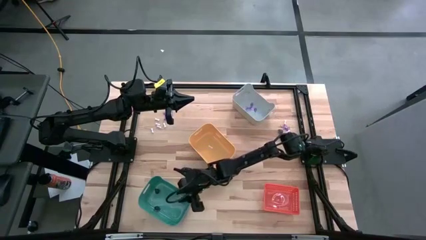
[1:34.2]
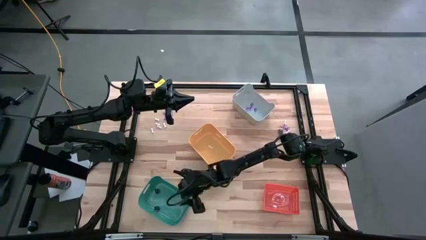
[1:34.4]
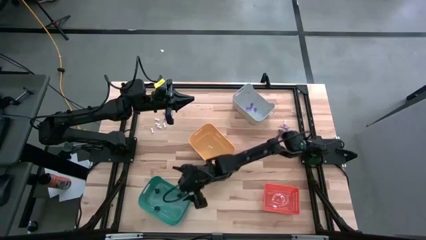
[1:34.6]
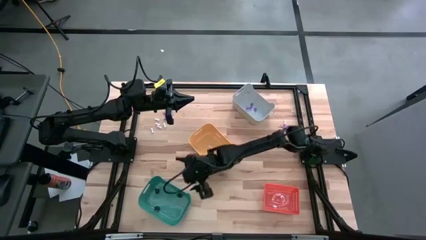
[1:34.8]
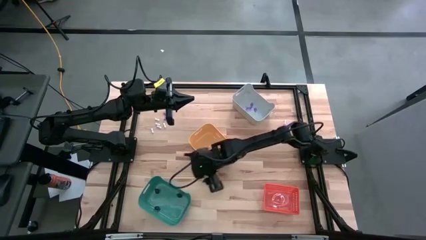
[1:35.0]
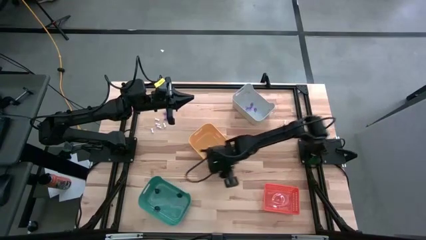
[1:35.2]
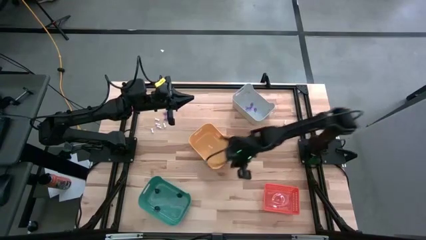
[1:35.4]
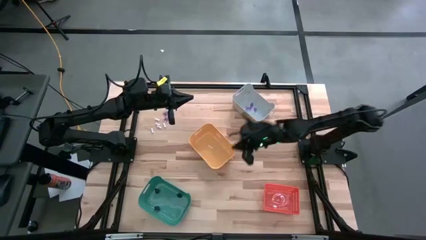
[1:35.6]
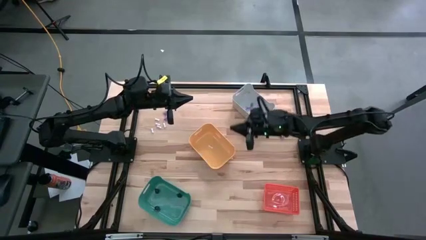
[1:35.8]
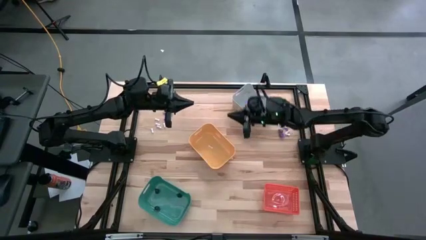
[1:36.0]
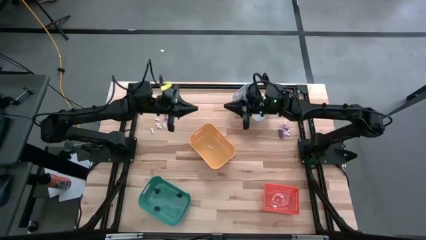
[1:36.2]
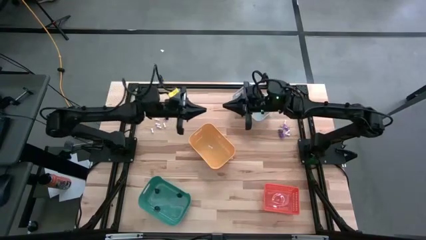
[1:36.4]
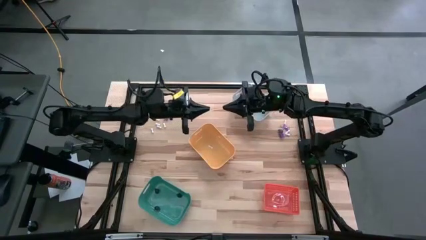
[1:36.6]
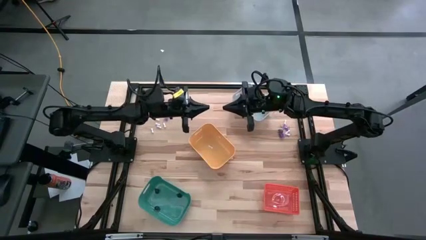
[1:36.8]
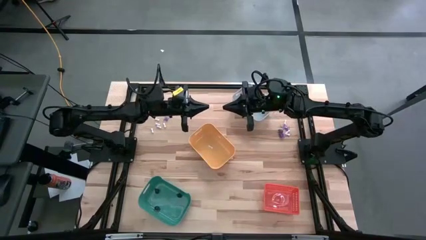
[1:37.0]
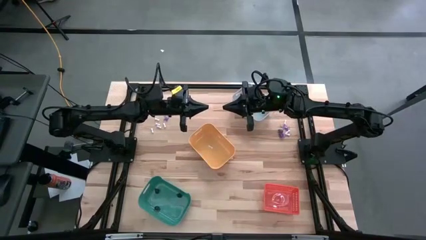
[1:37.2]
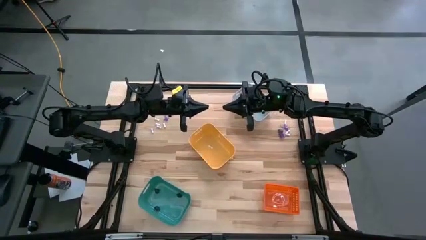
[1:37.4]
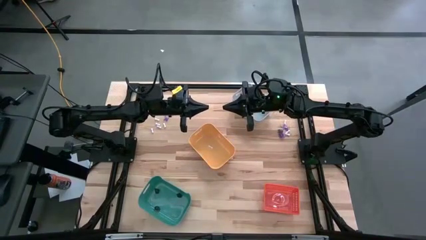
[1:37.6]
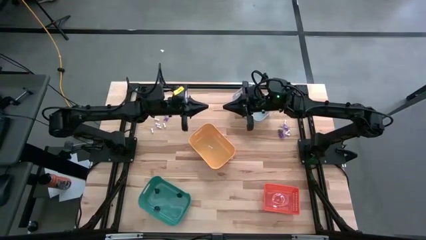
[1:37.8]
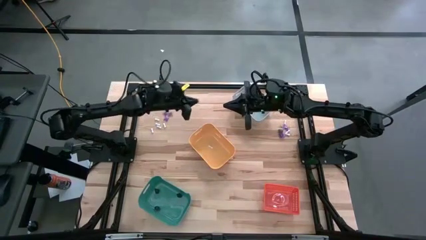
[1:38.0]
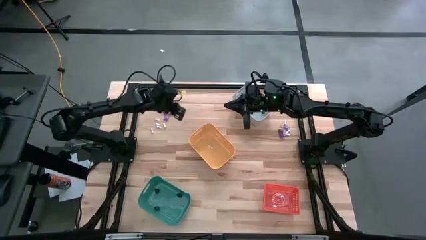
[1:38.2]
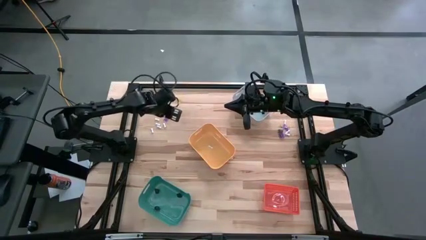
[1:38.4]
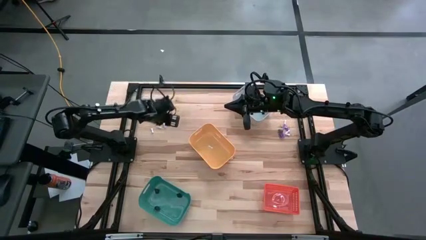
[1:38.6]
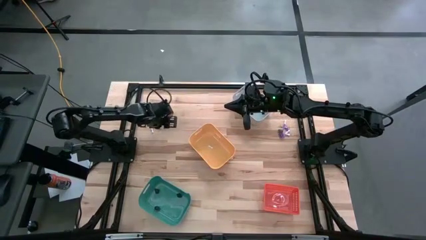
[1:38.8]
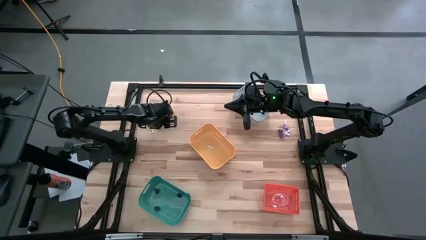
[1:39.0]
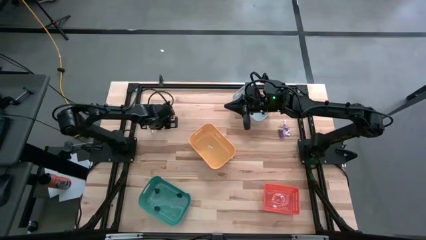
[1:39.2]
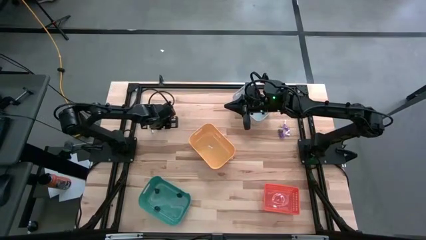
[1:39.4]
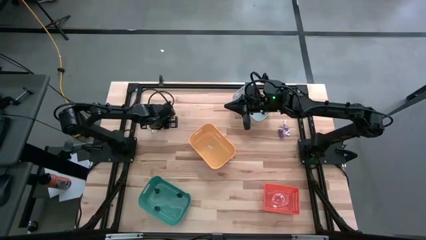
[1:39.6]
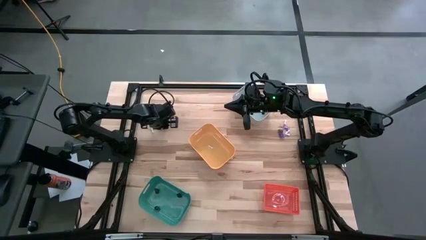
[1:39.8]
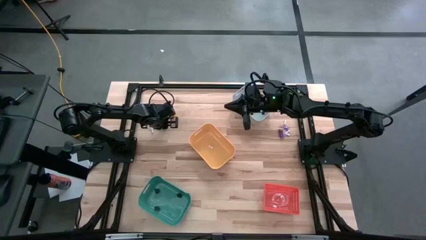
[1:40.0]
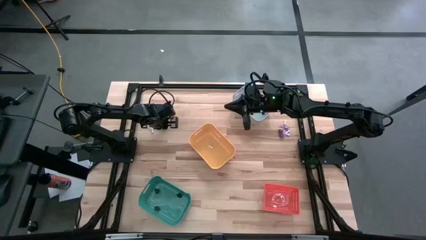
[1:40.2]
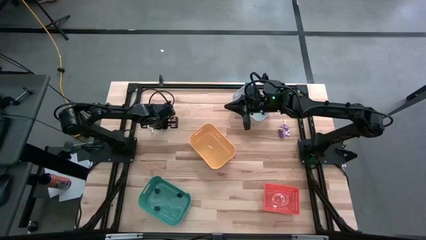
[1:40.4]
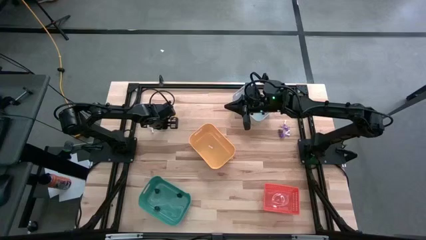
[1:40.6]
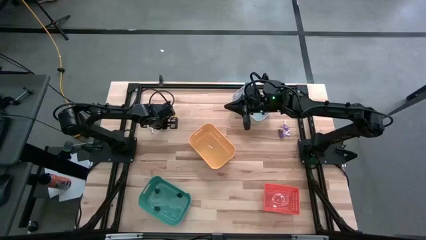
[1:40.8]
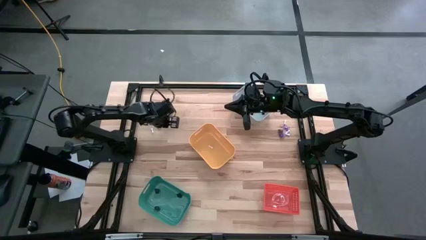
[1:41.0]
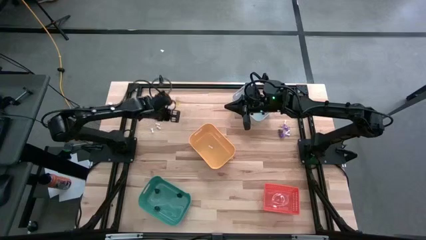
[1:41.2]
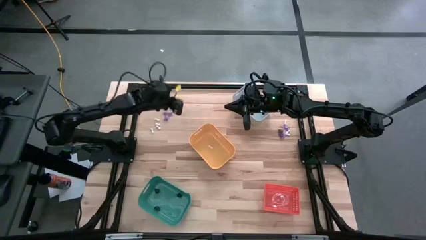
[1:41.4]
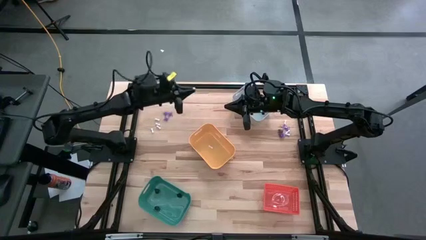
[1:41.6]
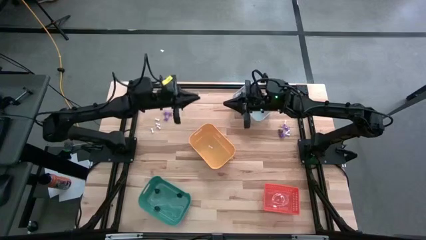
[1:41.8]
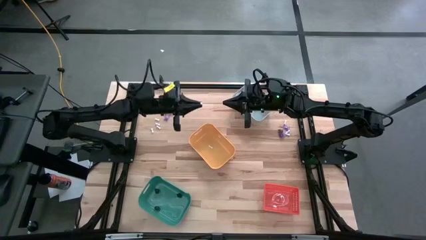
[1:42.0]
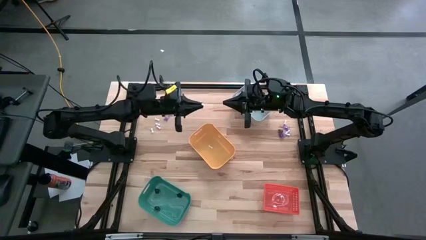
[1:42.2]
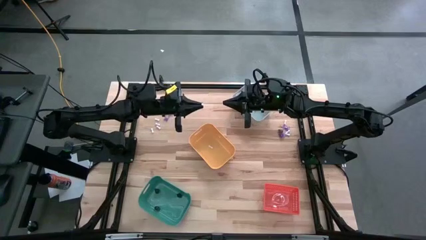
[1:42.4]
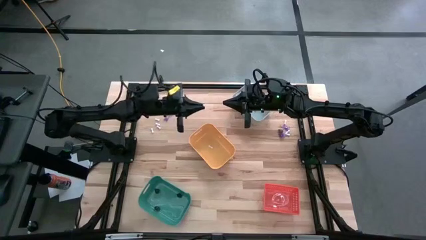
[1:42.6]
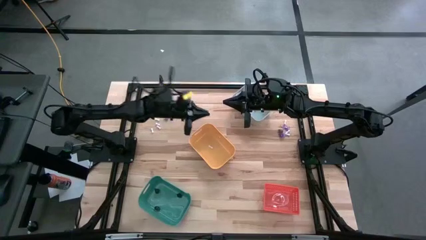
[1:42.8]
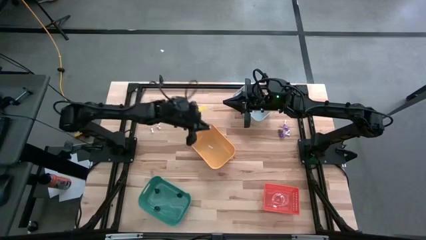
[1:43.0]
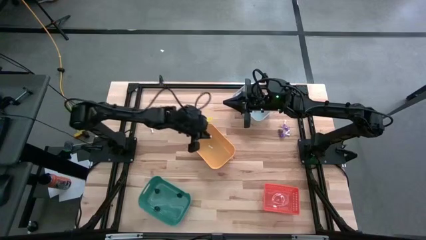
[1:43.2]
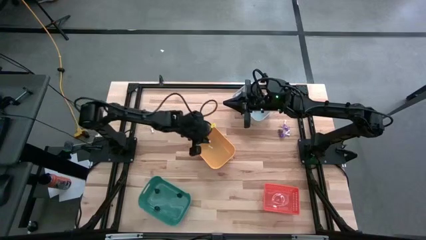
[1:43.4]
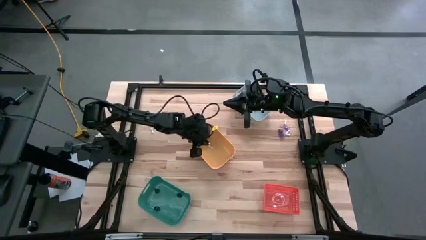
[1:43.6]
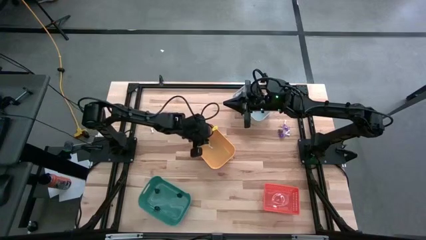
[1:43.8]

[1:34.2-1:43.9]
Task: Sort Halloween decoration
Put the white bone toy into the yellow bin

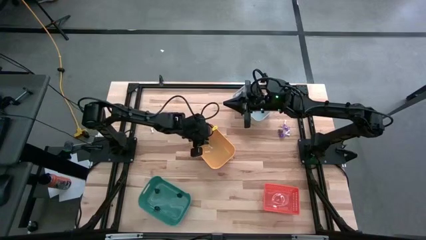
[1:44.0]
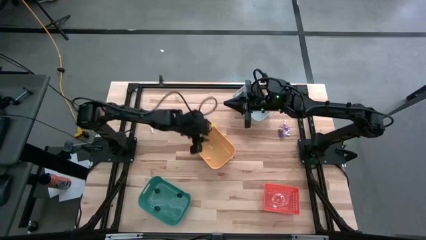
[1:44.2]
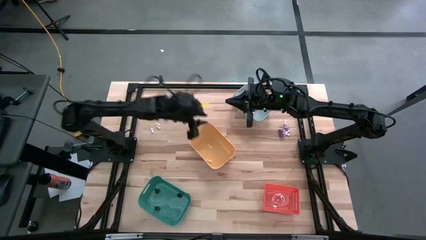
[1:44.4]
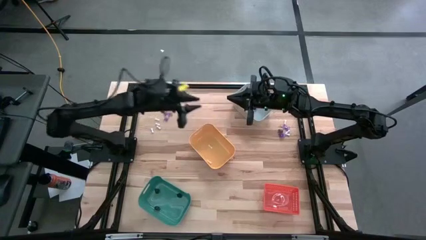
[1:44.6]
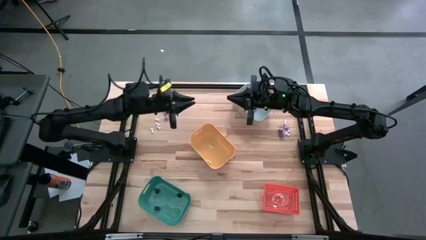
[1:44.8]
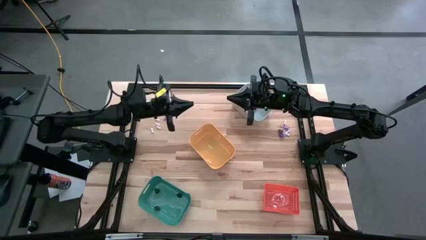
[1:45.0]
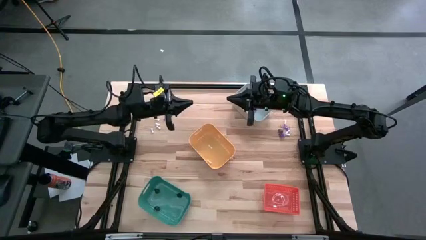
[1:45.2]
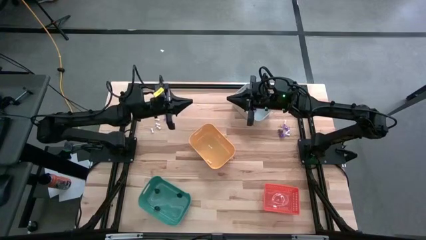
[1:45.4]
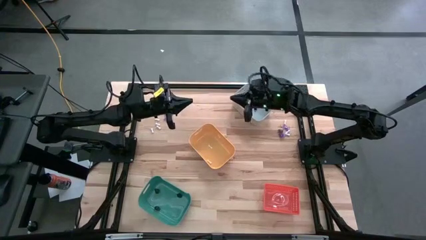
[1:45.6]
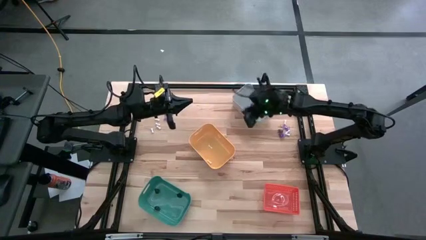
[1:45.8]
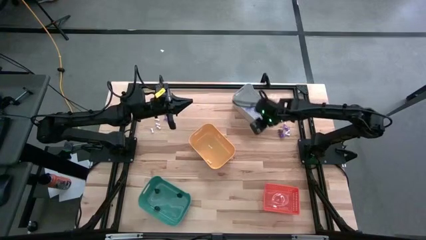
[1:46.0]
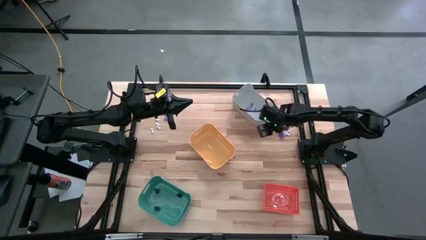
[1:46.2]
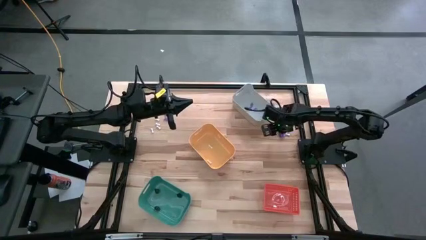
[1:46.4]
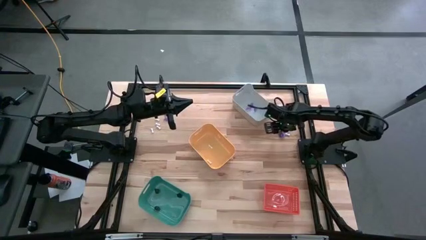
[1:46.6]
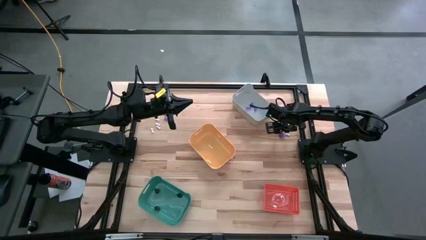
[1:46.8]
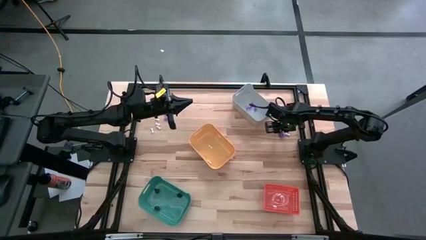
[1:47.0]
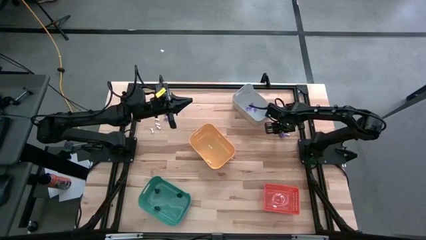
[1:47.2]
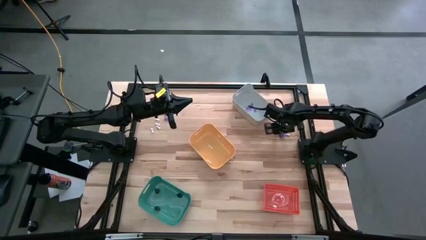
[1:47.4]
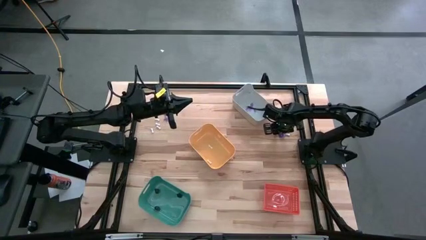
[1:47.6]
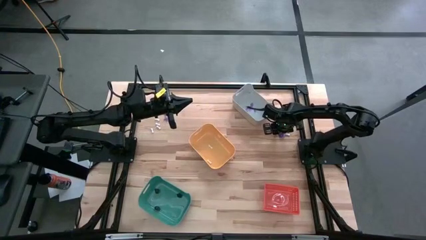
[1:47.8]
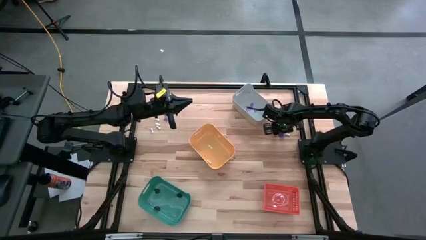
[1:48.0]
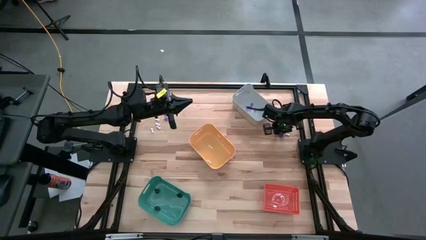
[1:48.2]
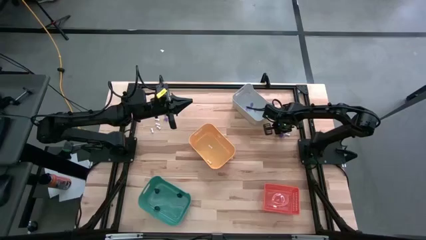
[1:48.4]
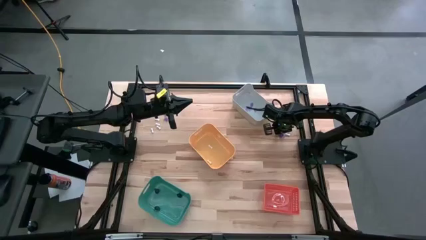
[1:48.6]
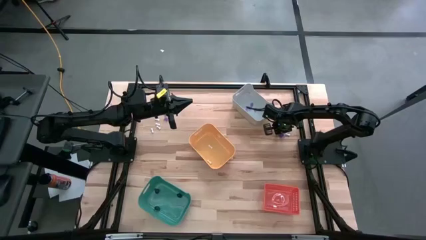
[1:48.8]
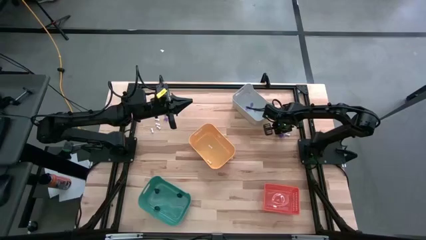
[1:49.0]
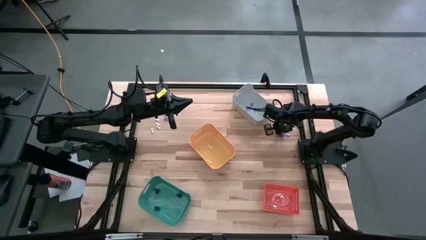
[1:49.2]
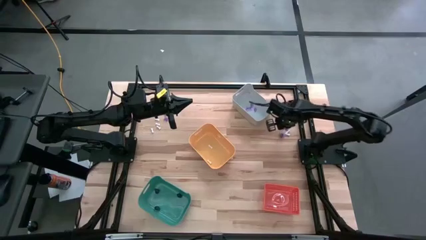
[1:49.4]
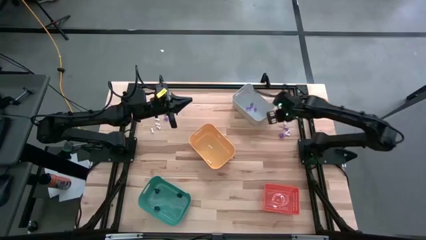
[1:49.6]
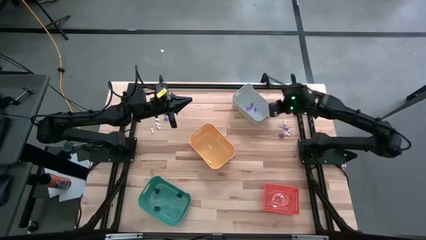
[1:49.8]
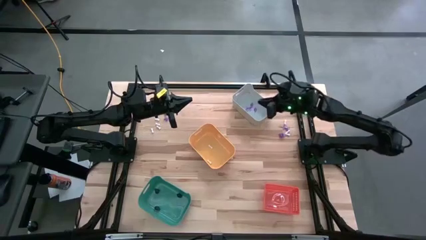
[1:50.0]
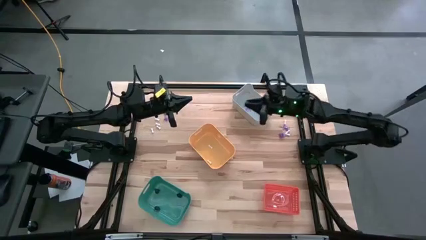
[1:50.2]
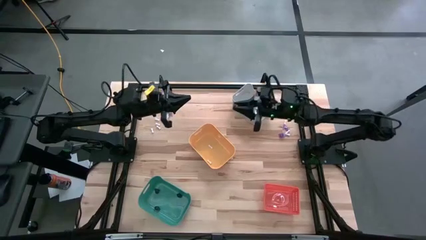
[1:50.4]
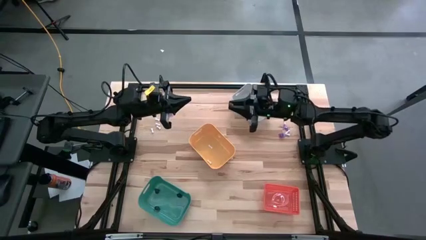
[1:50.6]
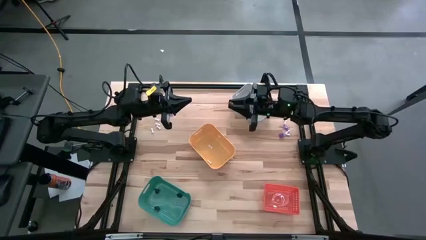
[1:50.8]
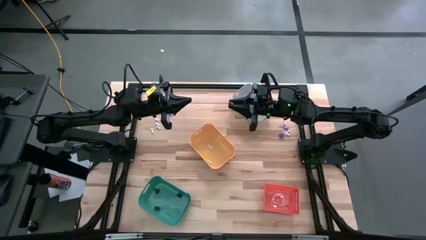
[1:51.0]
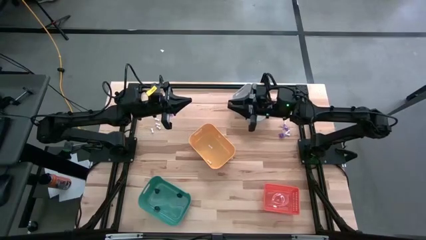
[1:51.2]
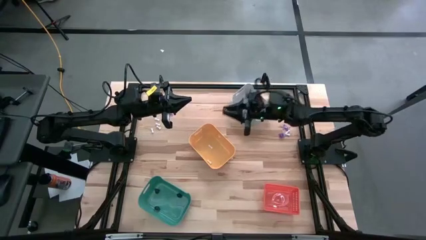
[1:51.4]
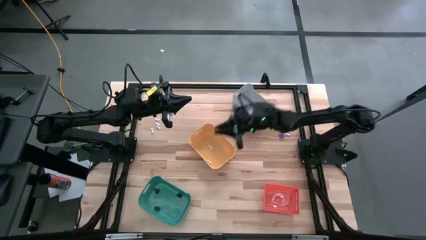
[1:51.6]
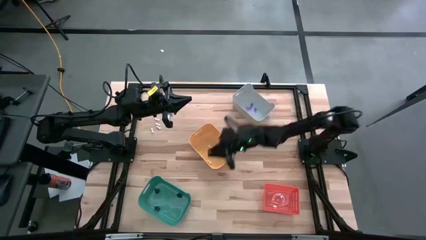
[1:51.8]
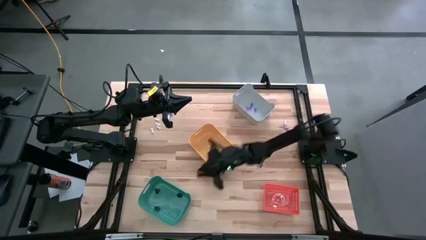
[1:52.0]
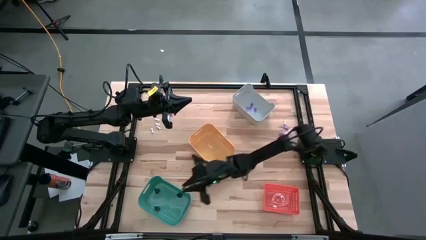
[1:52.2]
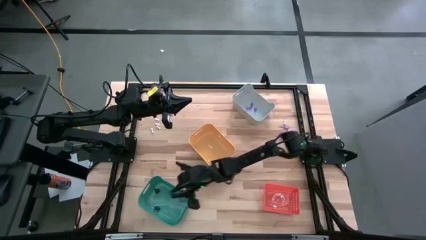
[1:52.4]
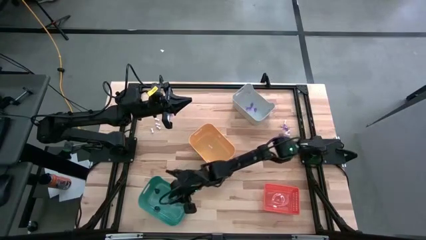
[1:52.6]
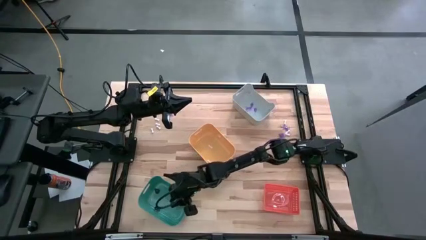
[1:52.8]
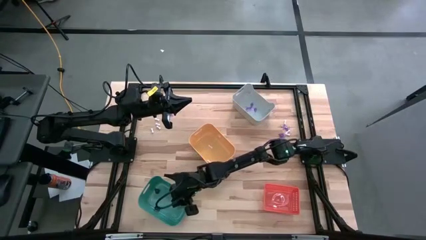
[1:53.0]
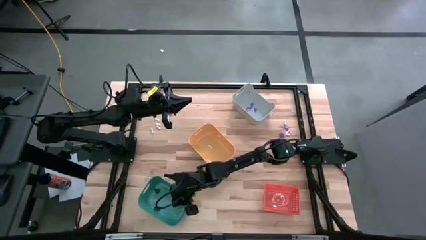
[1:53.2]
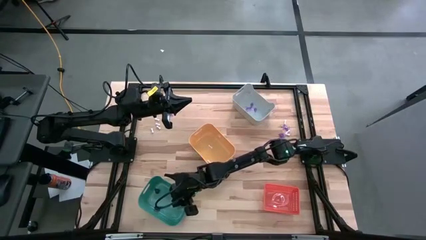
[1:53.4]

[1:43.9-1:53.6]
Put the black skull toy into the green bin
